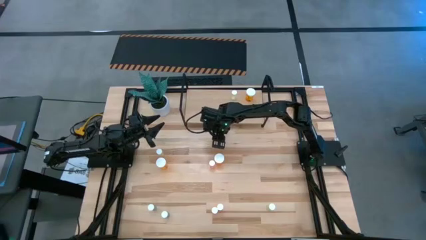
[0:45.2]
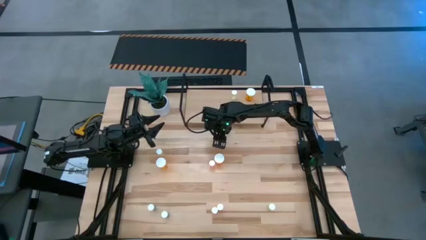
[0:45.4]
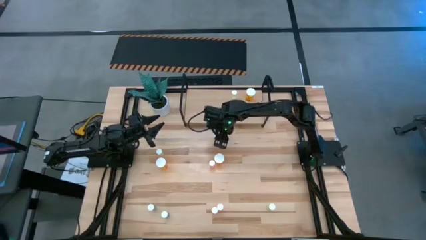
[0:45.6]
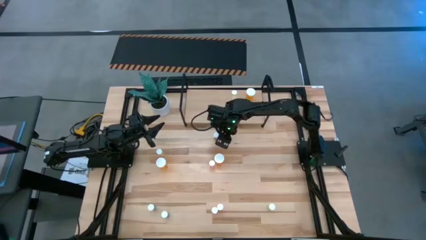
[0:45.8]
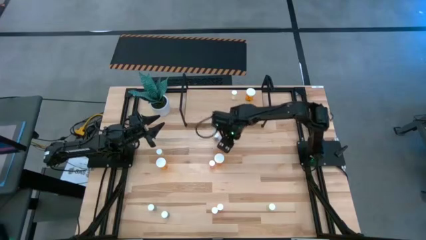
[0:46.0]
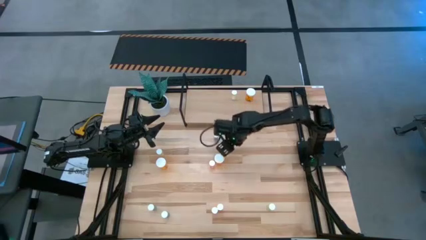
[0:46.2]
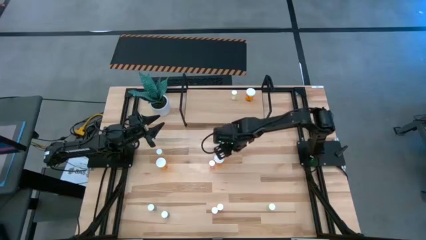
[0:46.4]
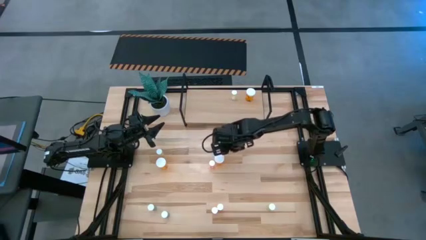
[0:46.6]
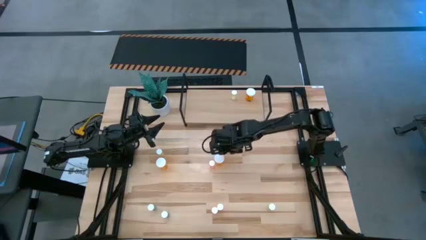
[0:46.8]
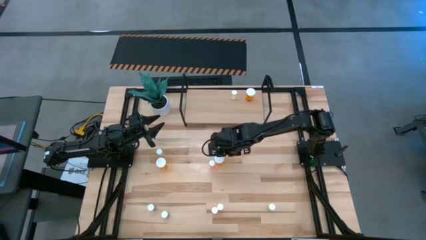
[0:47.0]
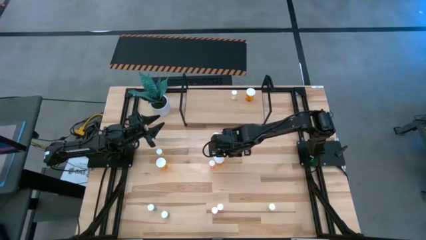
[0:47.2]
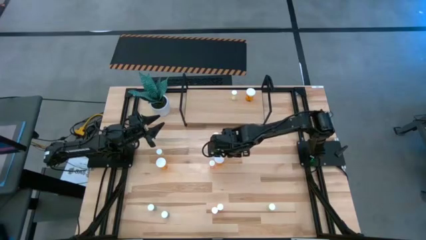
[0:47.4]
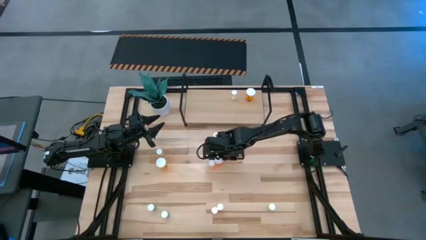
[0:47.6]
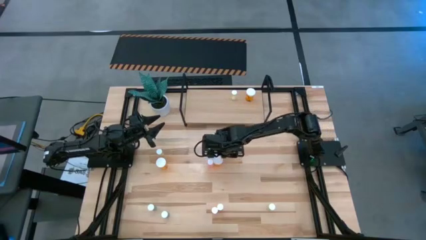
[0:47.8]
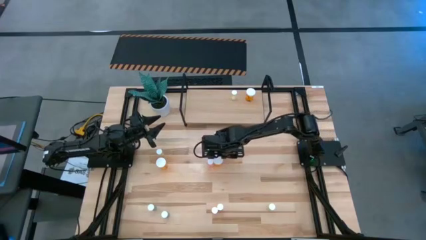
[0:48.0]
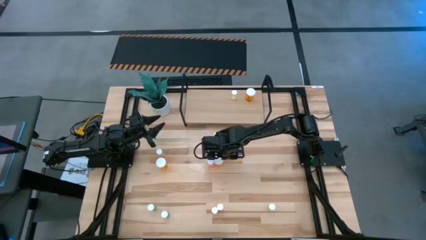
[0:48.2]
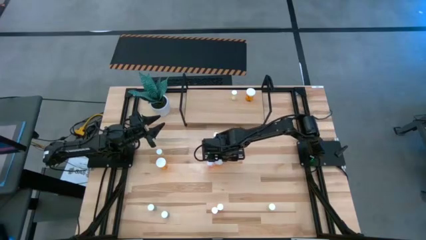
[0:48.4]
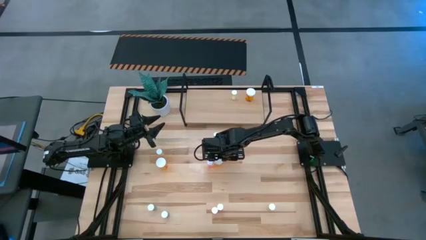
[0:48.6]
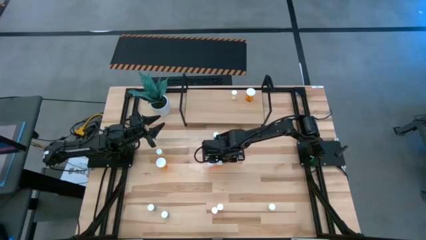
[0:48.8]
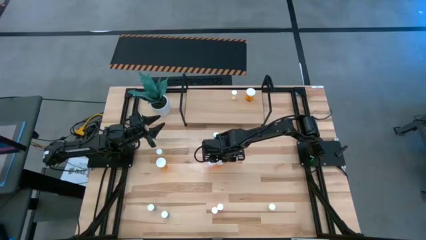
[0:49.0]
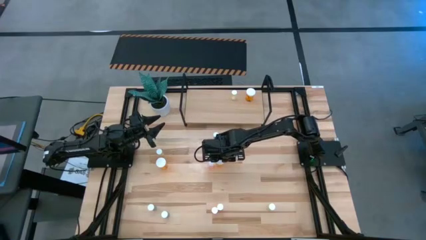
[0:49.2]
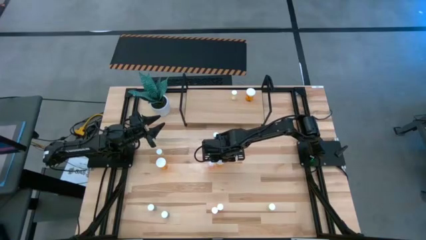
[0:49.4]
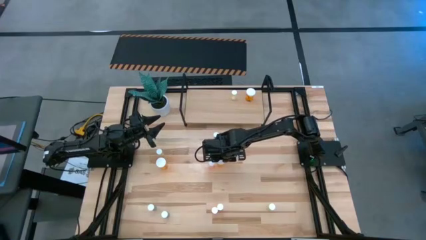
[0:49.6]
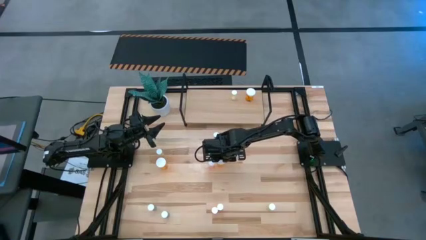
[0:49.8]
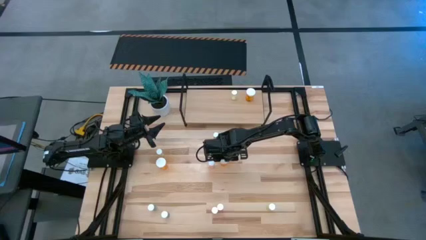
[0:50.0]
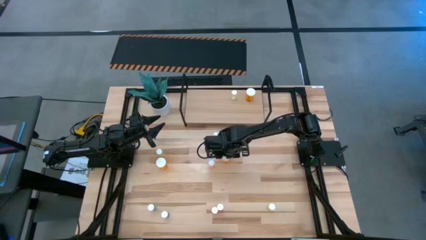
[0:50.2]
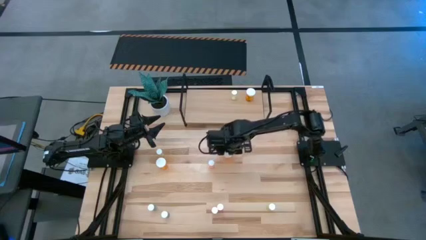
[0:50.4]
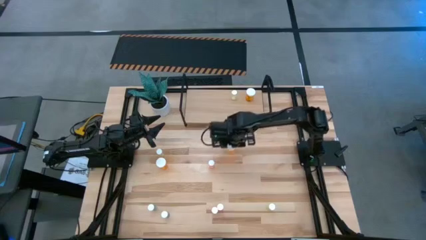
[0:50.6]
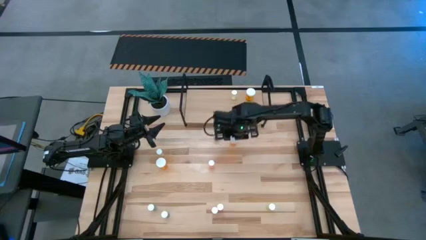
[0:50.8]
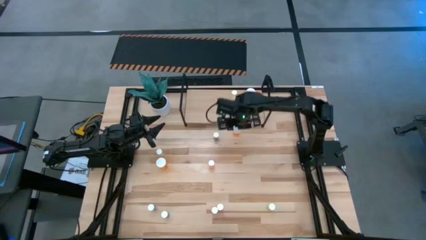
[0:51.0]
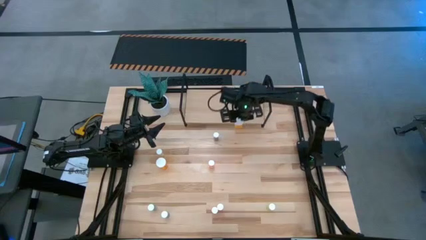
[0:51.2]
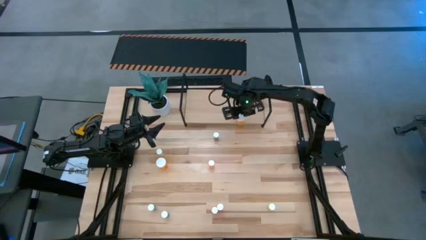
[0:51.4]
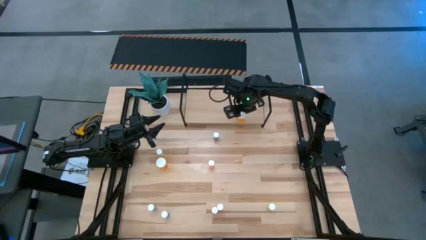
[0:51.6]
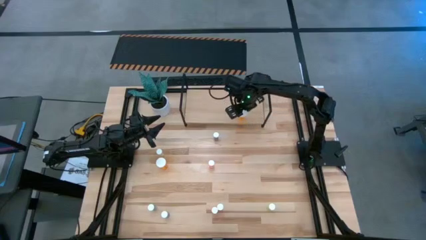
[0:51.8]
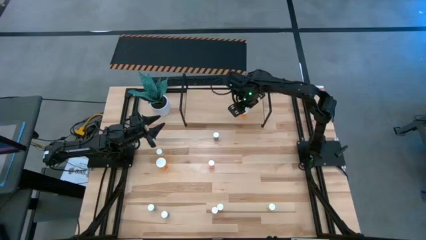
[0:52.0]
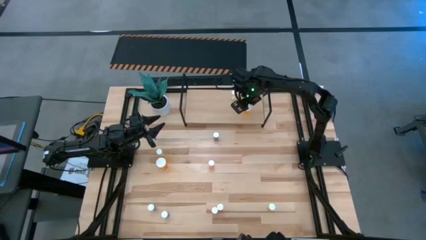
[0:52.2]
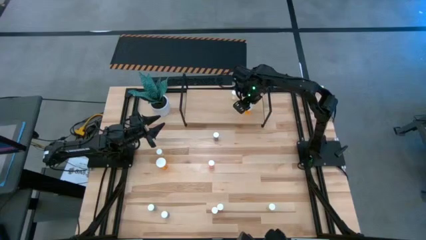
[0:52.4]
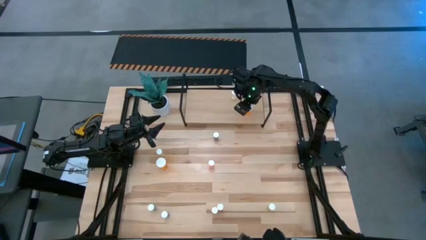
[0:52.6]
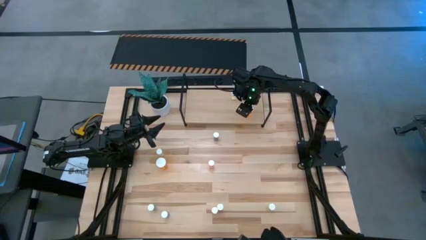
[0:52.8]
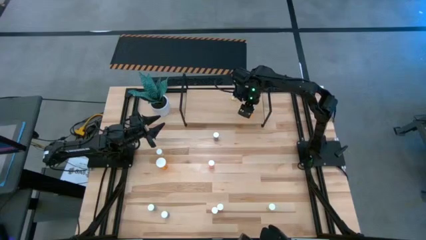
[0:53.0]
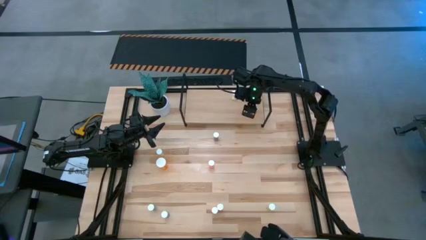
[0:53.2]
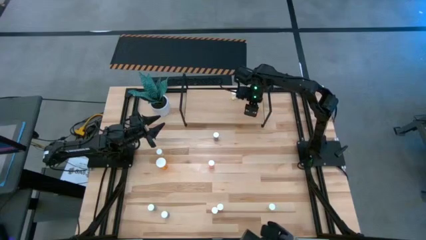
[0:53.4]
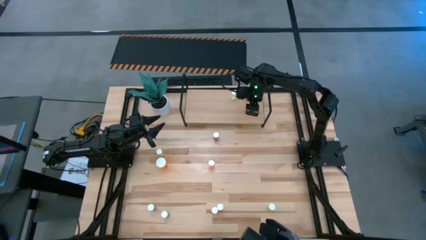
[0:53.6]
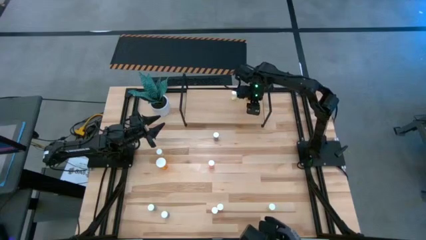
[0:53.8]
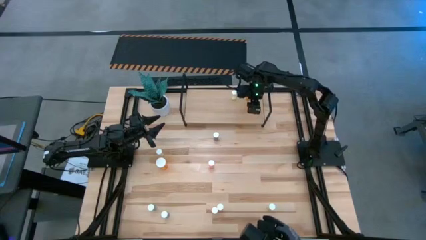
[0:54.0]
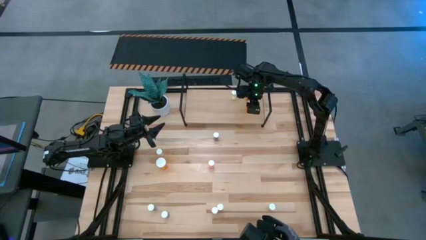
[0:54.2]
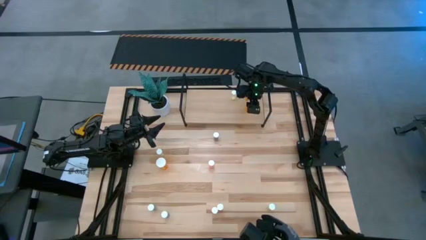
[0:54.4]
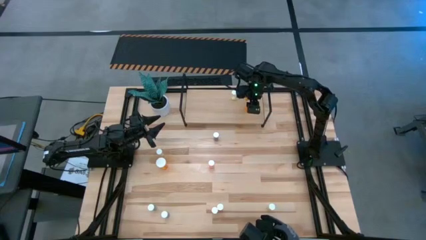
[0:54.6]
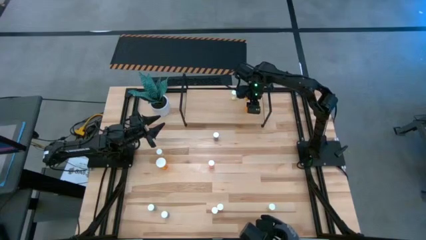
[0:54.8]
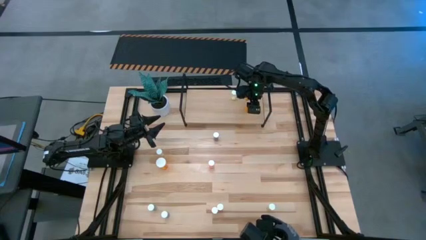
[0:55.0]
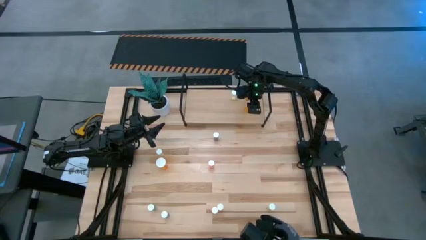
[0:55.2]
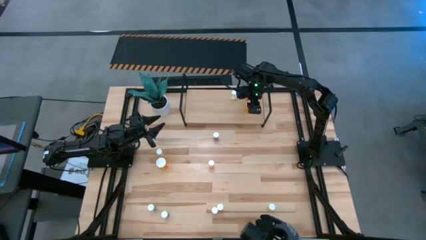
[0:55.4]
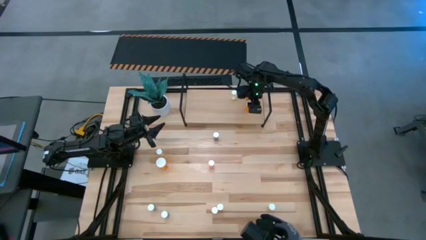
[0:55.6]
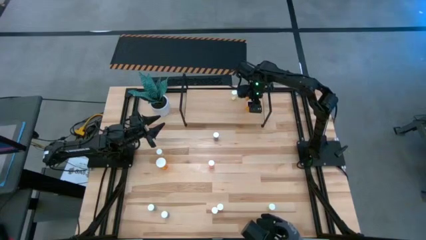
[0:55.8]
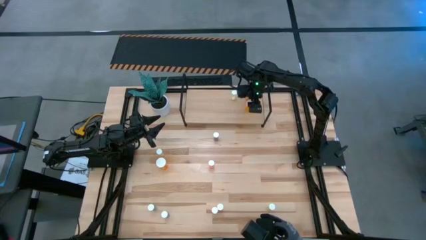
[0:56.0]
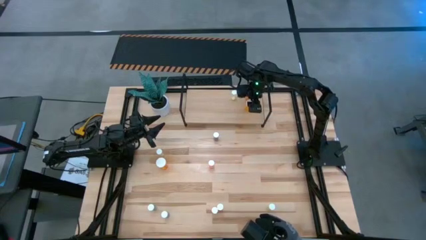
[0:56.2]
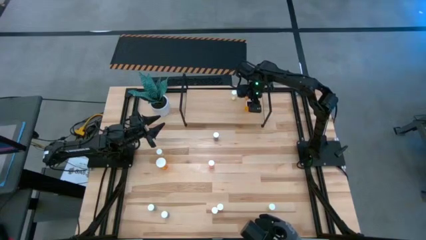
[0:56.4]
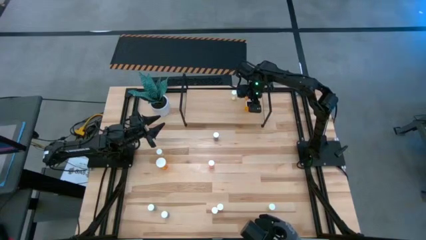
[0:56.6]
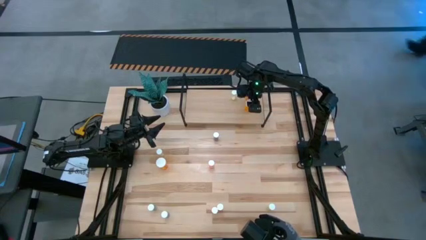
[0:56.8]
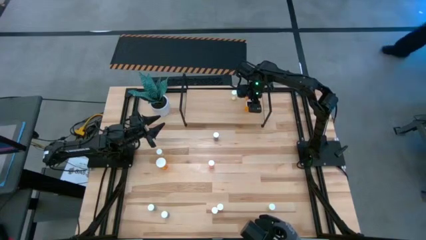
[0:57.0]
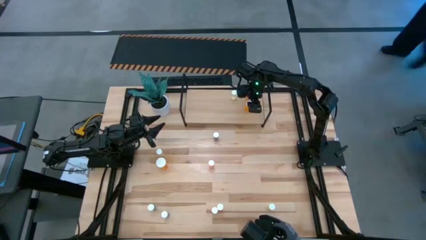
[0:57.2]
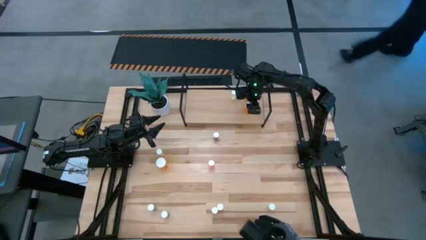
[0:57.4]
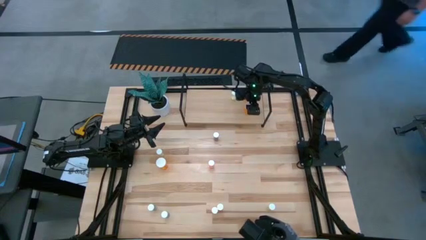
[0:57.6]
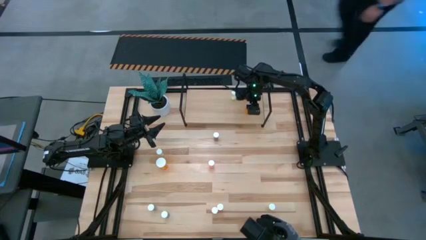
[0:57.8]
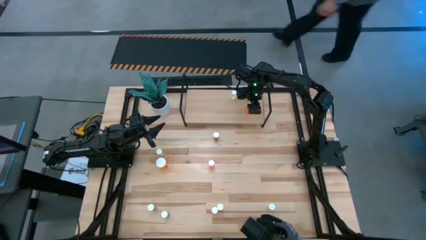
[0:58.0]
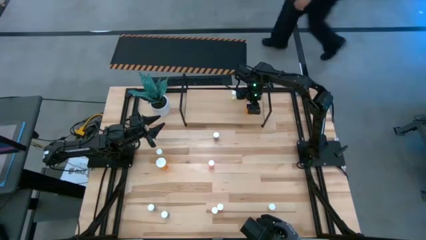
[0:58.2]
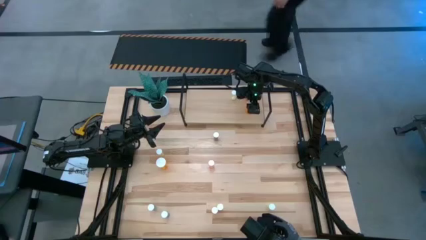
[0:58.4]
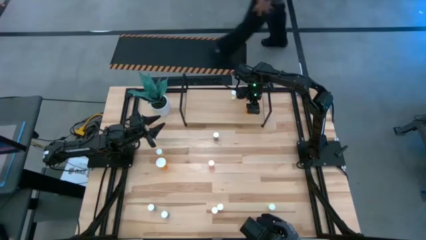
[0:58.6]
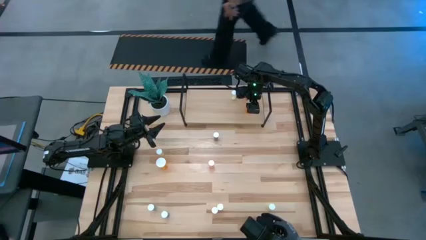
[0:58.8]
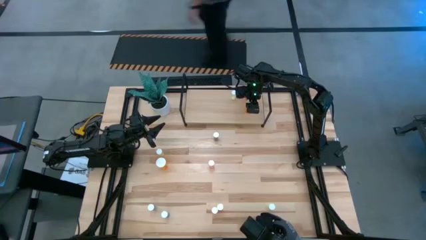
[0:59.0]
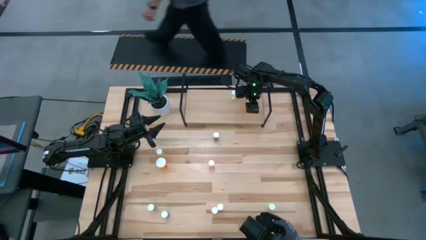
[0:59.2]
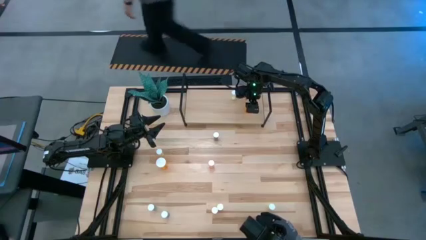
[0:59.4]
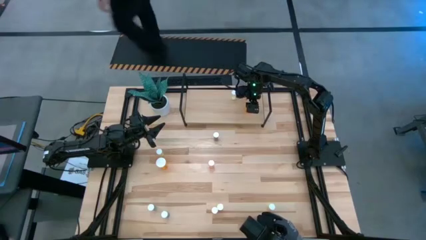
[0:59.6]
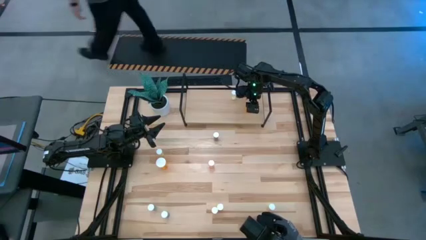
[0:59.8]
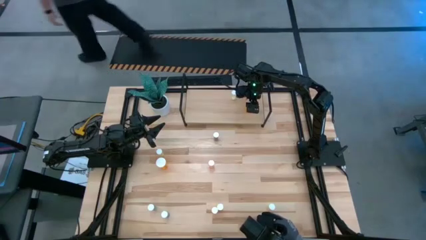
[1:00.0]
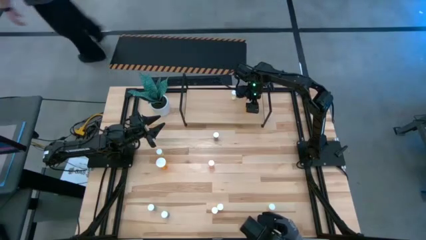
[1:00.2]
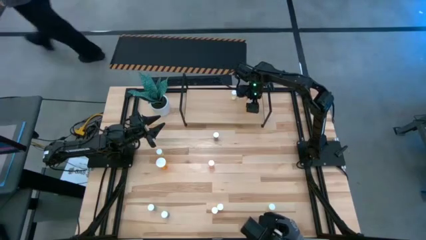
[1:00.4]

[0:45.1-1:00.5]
Task: Pick and place medicine bottles onto shelf by color
Put the pill bottle on the shelf

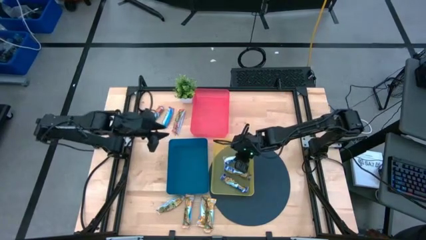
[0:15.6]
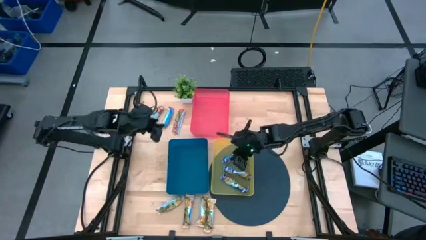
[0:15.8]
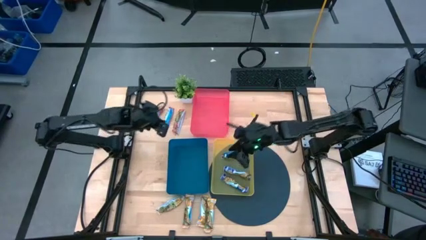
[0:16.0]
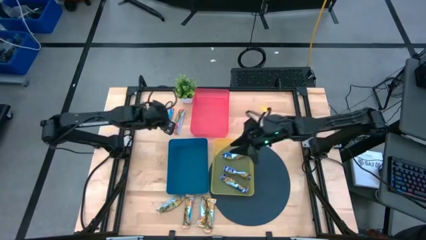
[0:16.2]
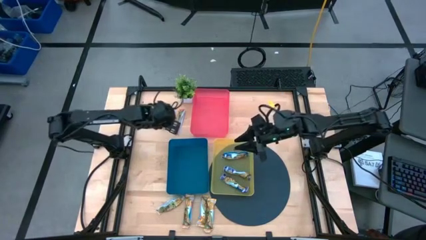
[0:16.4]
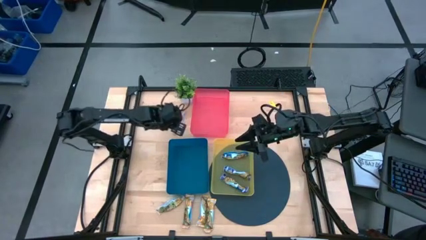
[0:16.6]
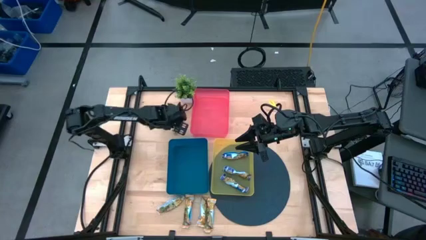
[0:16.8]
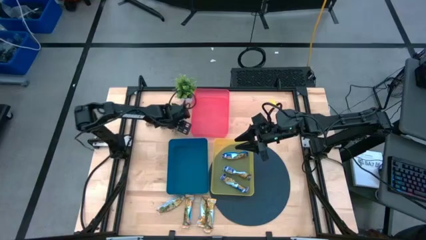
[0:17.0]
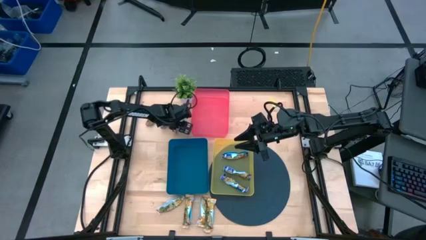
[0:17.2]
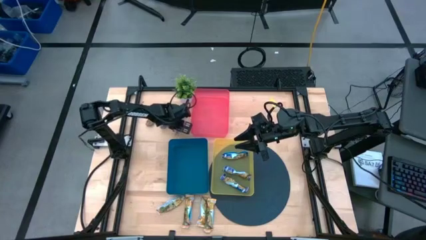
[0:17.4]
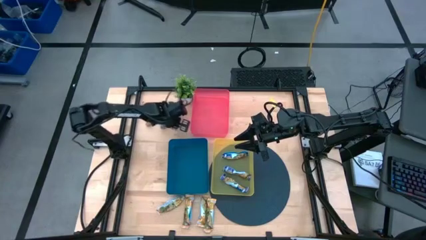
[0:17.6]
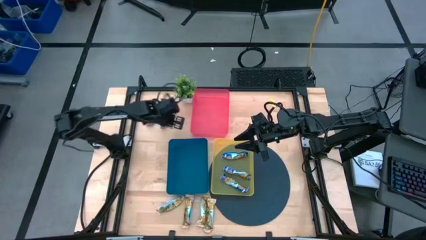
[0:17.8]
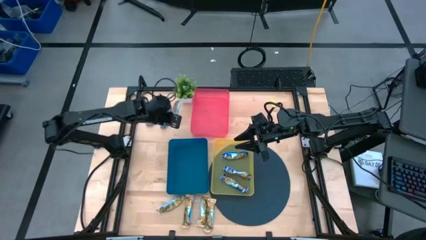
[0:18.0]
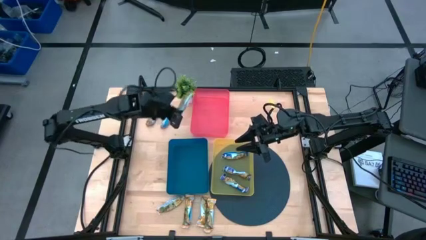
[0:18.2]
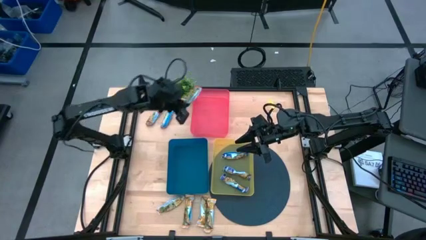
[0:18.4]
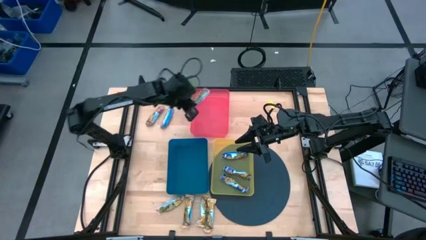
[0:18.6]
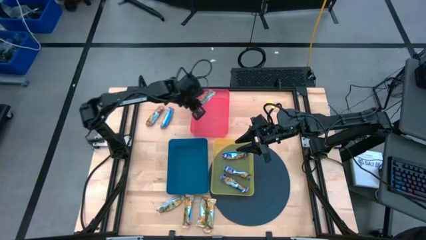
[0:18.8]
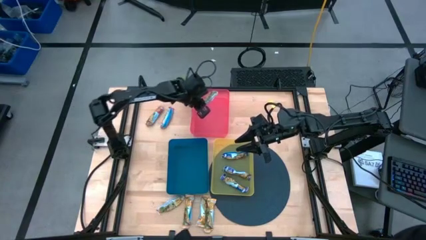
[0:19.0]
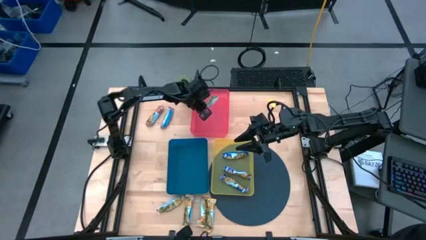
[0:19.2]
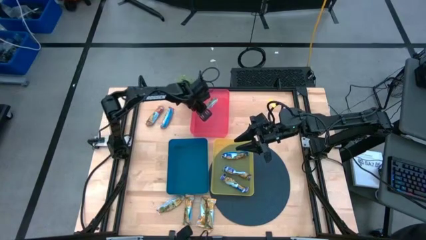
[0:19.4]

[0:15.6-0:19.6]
Task: Pick and place Granola Bars by type
Put the right red granola bar into the red bin
